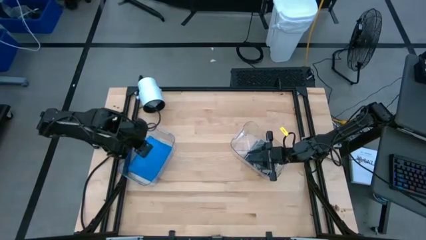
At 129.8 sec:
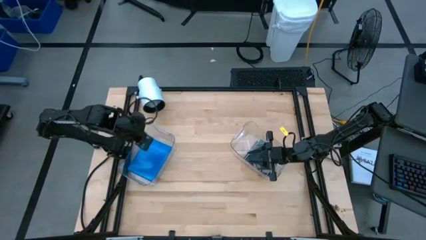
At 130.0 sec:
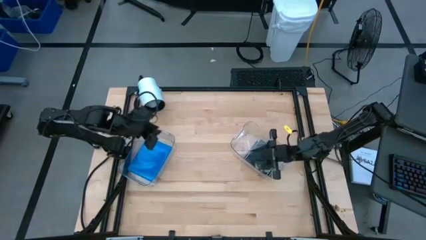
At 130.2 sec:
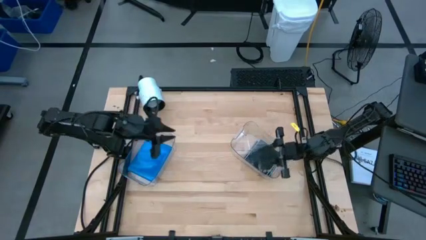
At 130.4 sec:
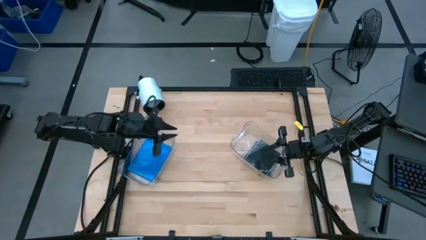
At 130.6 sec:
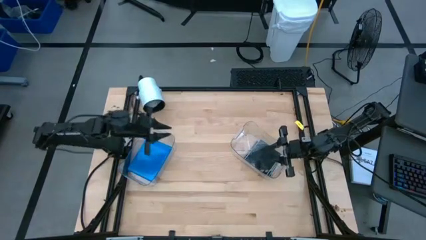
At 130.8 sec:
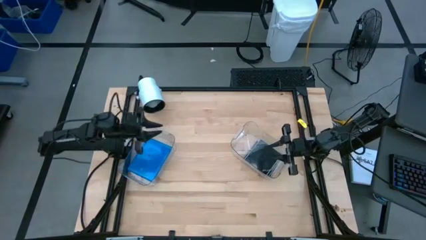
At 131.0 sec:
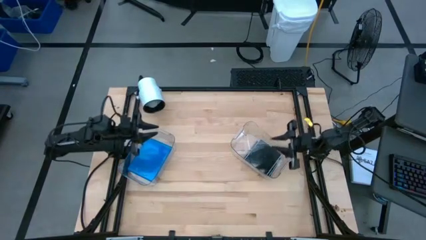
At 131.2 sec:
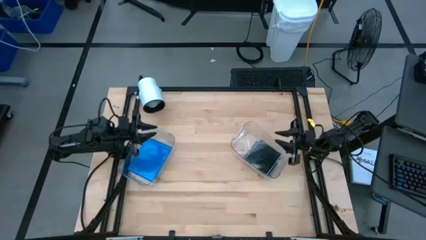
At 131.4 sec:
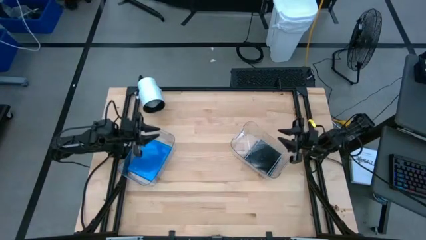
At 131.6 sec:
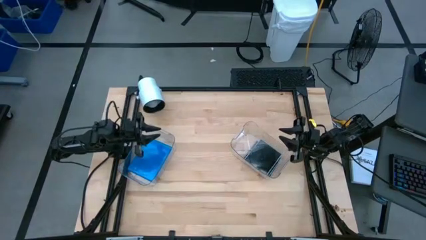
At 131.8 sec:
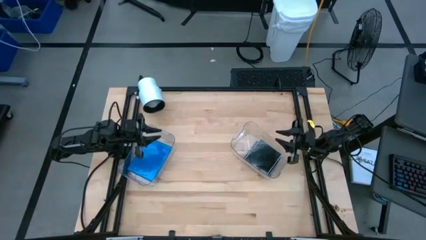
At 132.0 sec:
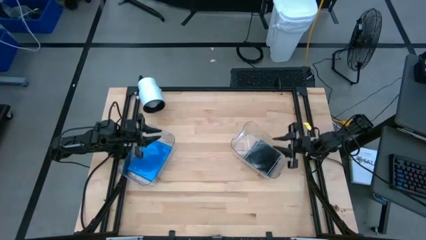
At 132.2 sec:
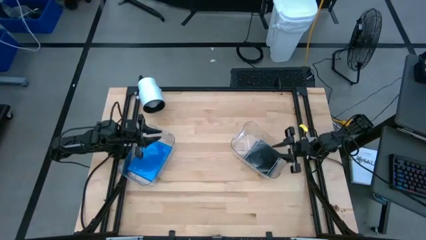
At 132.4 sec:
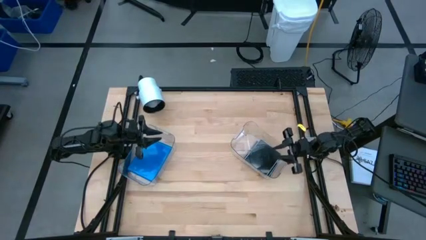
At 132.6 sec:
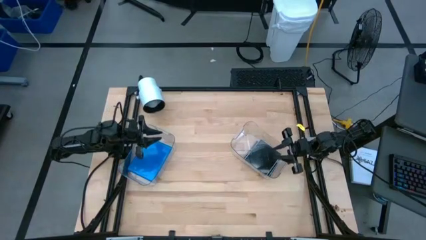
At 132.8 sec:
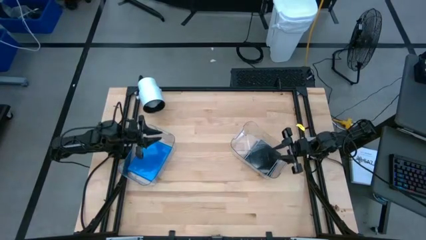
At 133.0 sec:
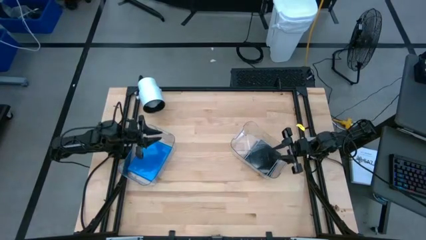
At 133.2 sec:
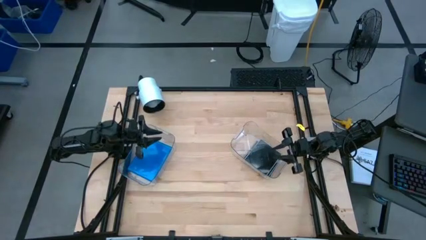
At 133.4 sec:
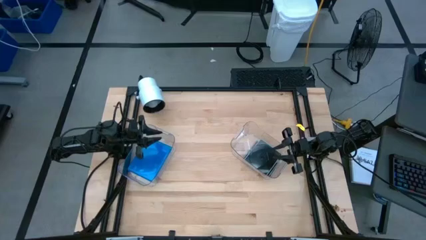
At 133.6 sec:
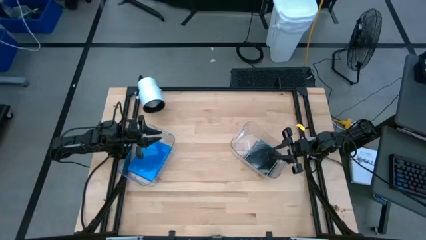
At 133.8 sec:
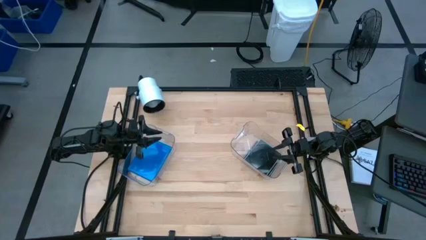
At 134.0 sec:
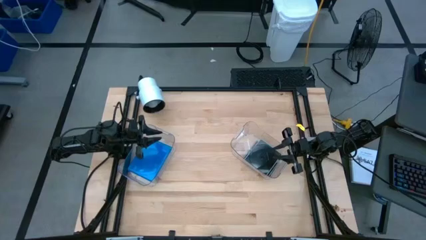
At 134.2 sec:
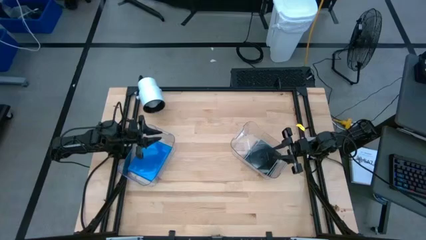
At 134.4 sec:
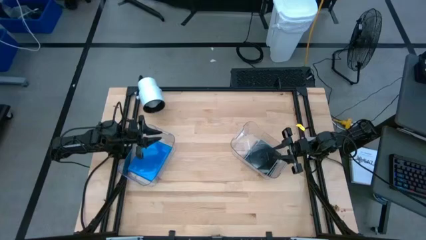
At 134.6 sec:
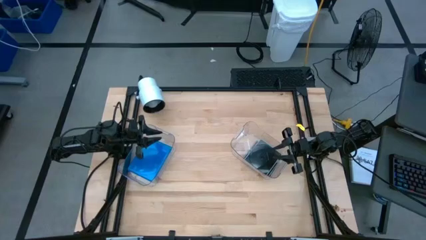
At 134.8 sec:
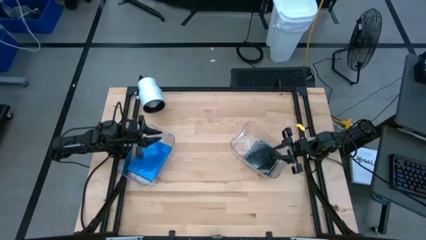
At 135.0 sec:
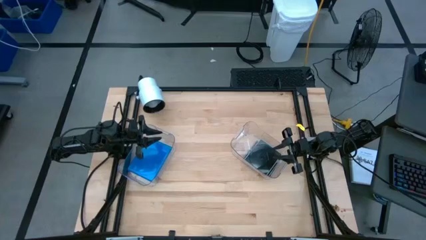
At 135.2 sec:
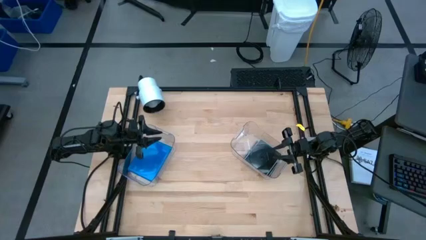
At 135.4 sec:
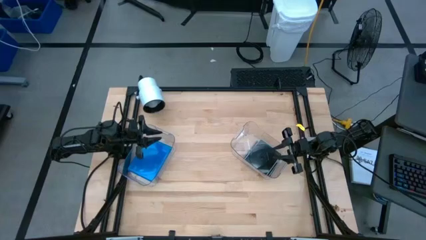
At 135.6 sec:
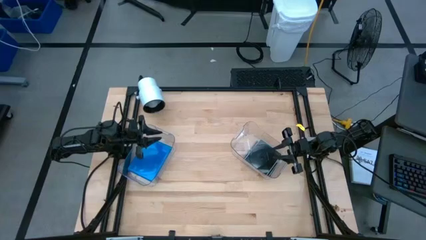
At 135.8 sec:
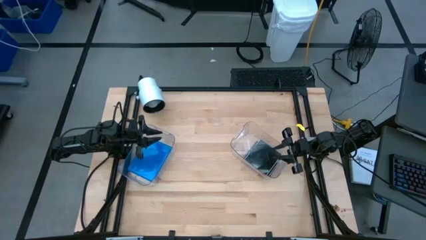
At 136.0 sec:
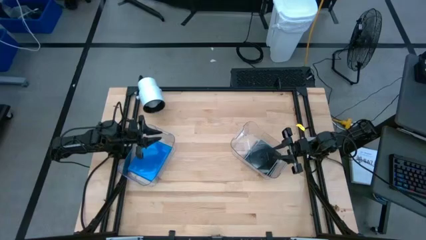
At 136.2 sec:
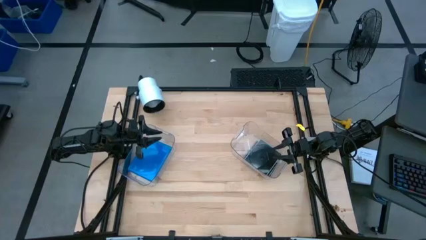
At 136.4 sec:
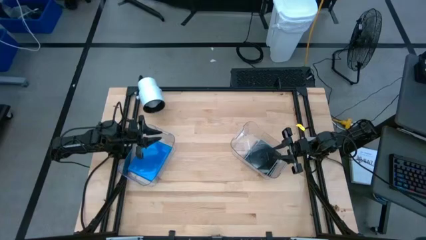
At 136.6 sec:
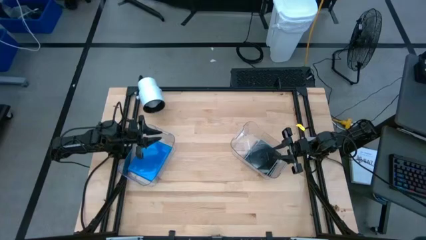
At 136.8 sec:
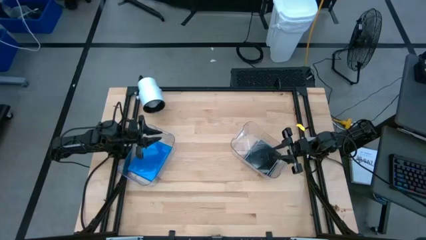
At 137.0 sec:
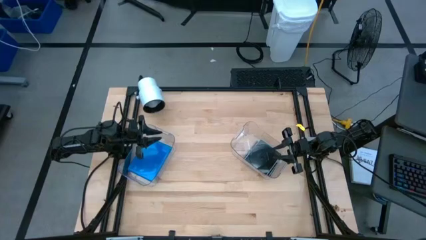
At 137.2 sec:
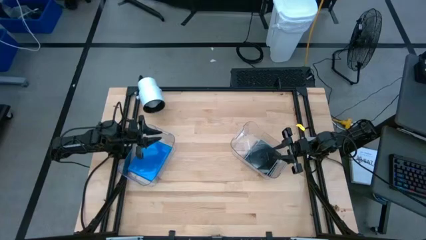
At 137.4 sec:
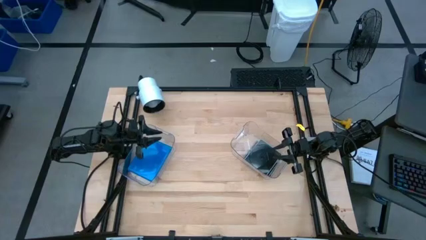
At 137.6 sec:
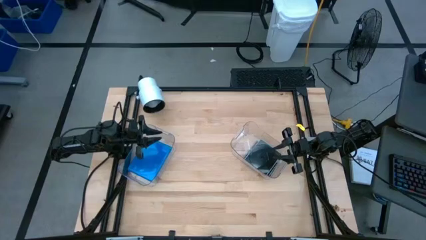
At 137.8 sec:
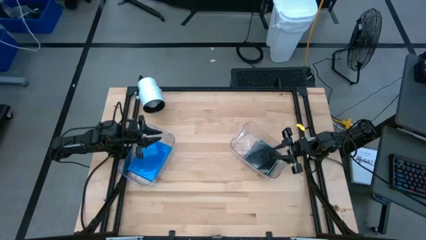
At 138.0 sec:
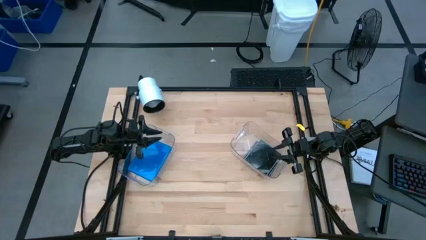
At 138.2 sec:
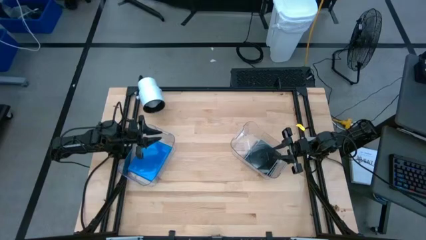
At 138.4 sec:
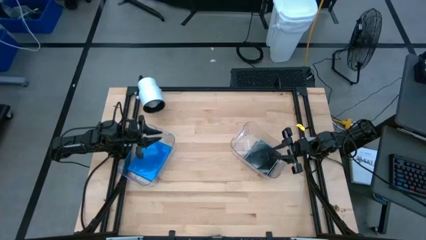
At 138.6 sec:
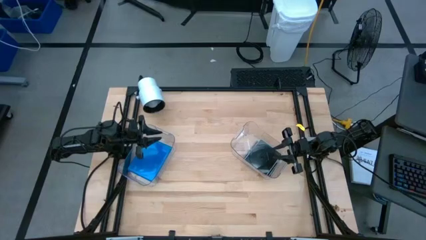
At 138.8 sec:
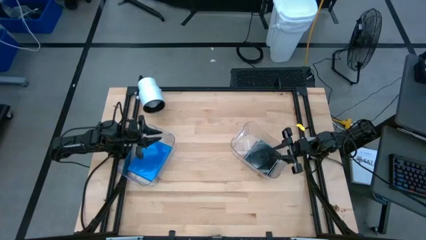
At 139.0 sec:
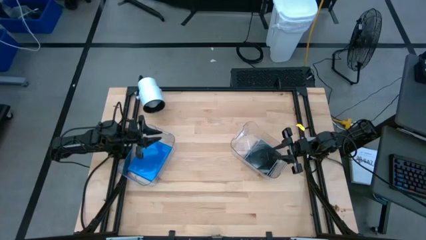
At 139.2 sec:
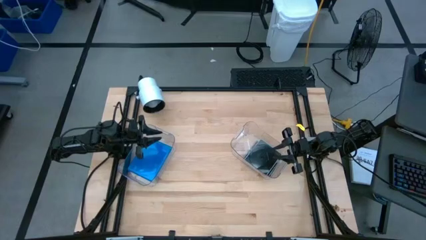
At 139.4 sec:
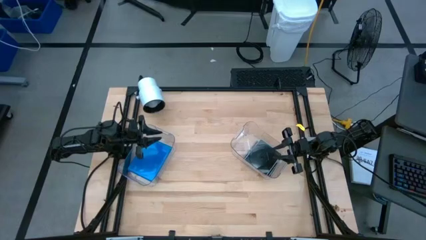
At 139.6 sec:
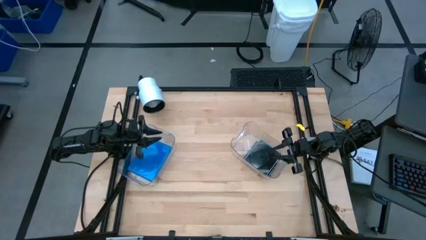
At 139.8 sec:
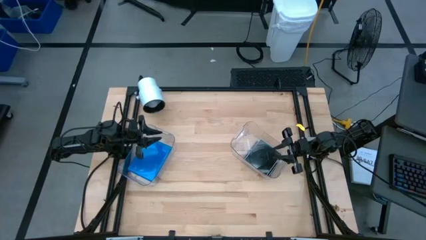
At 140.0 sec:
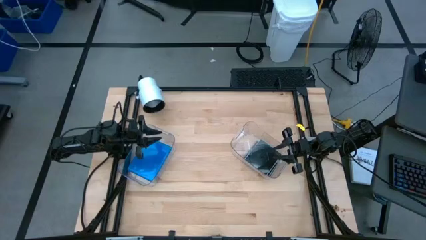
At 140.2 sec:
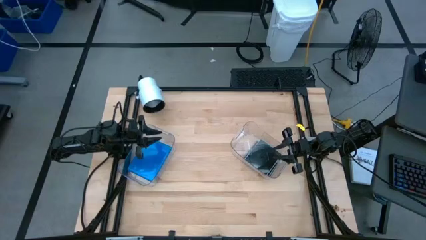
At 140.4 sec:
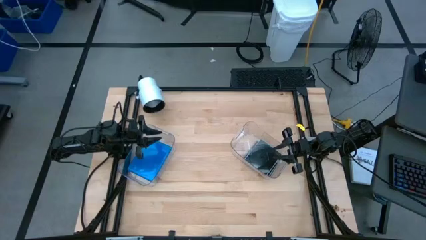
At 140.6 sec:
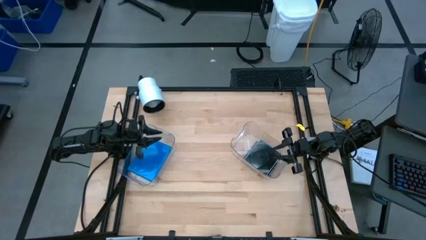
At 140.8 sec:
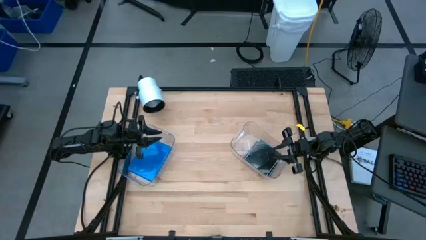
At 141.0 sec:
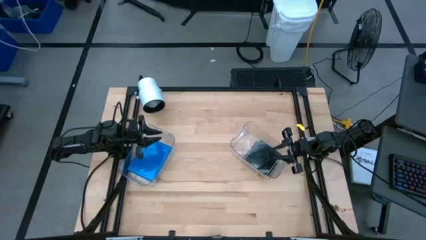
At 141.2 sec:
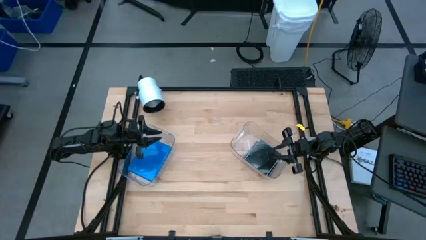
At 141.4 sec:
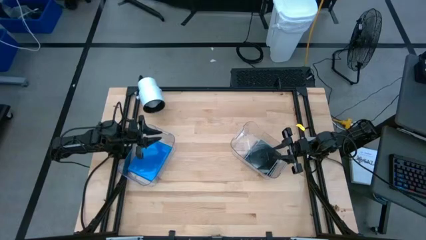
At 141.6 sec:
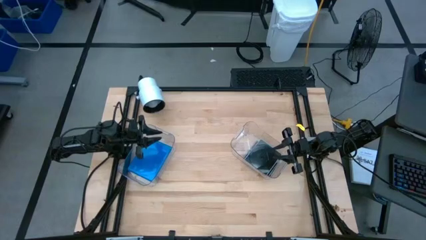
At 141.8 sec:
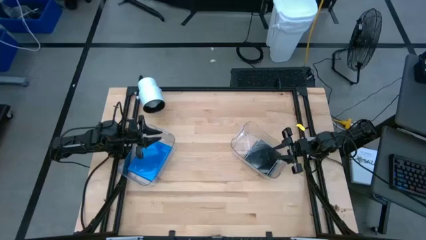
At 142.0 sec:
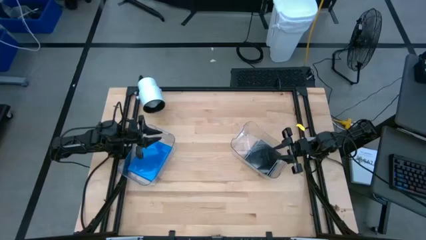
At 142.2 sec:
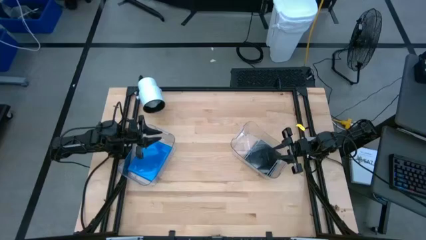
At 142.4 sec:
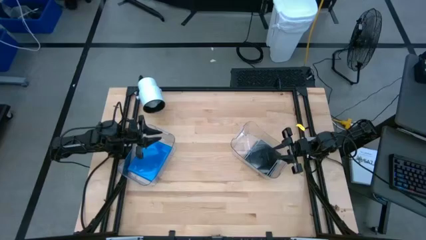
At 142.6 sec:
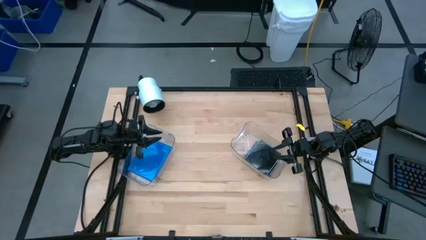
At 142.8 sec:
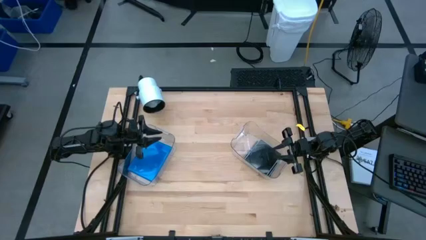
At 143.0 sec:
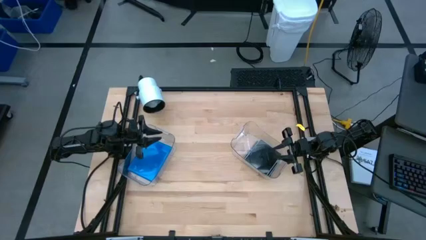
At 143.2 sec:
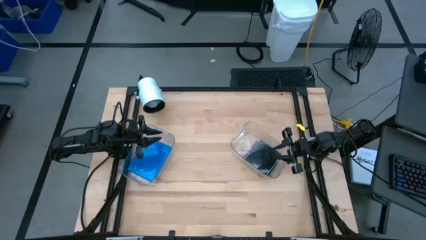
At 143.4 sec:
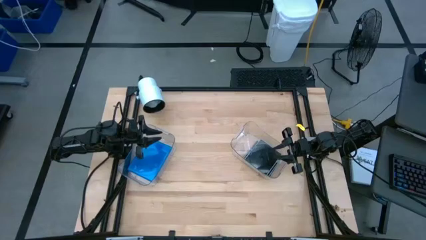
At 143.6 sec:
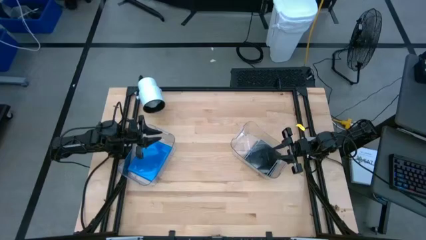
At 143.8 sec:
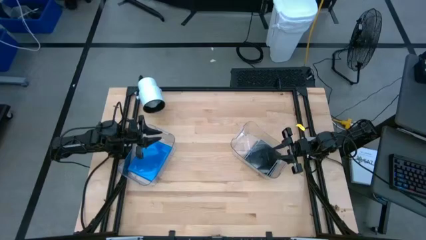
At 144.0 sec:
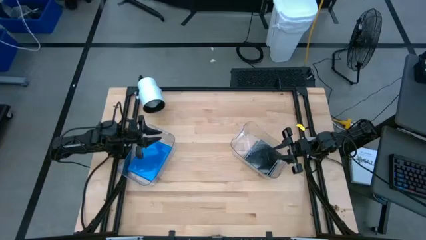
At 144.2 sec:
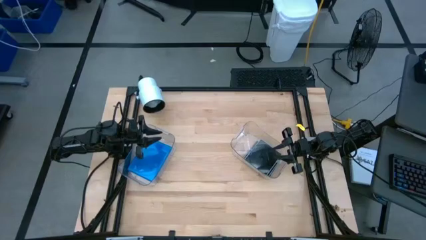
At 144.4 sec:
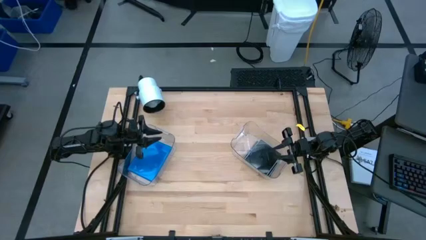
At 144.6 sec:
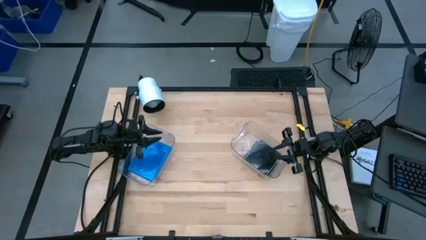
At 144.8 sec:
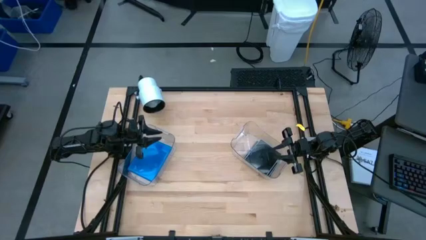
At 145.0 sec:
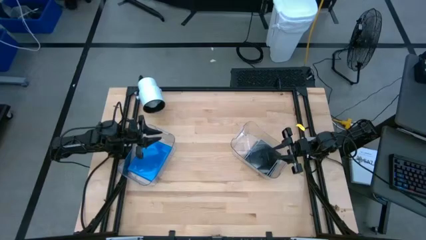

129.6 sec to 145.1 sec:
Task: Pick & place jewel cases by type
Return to Home Position
